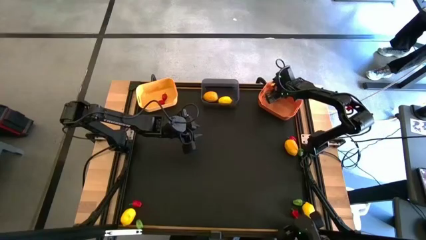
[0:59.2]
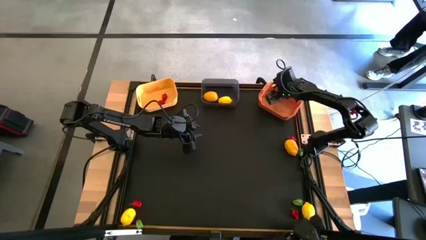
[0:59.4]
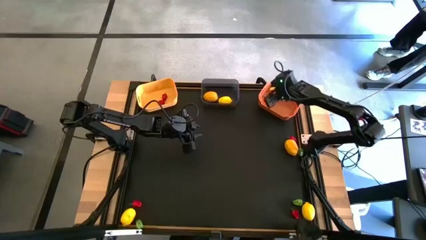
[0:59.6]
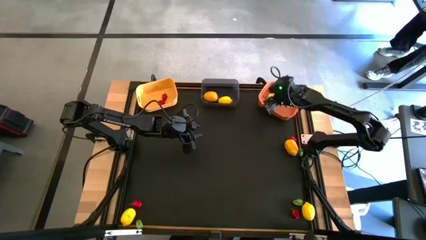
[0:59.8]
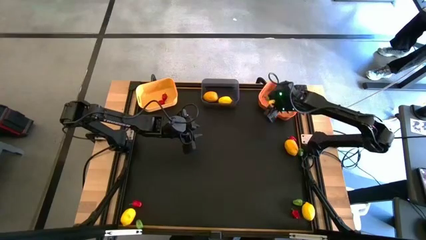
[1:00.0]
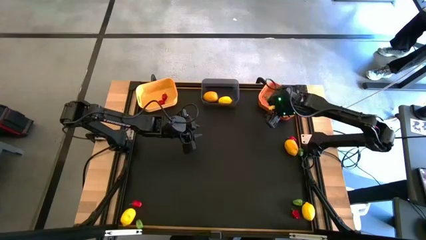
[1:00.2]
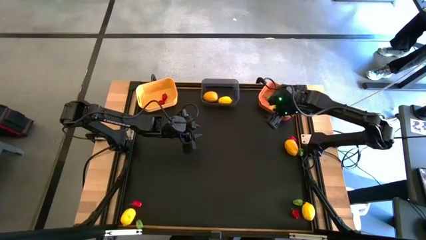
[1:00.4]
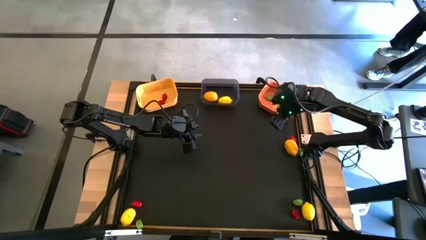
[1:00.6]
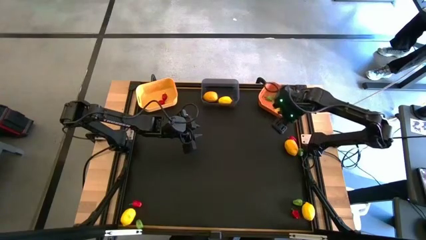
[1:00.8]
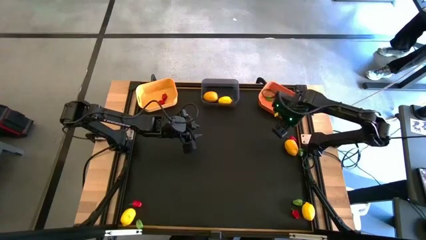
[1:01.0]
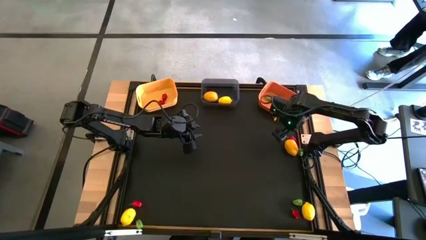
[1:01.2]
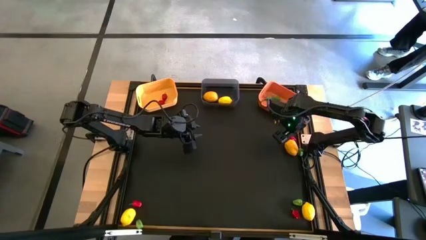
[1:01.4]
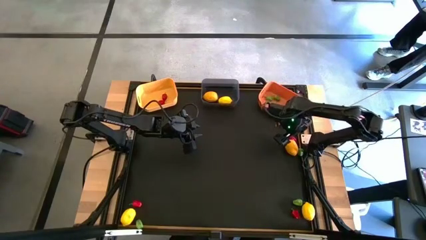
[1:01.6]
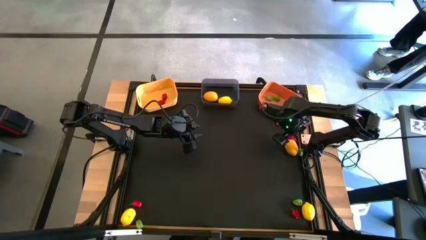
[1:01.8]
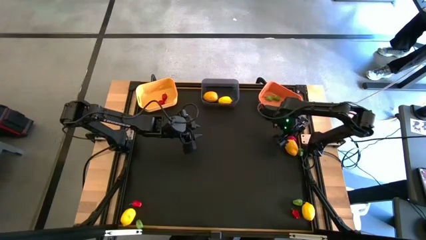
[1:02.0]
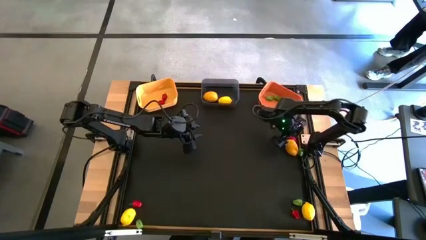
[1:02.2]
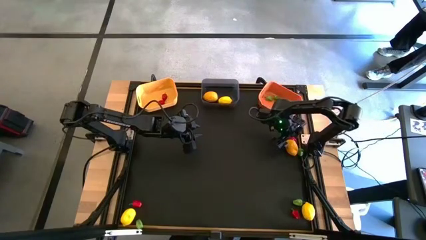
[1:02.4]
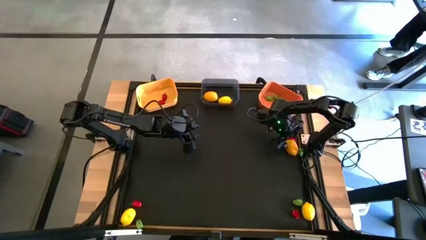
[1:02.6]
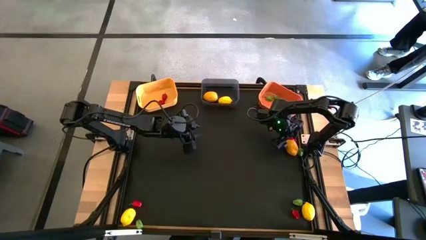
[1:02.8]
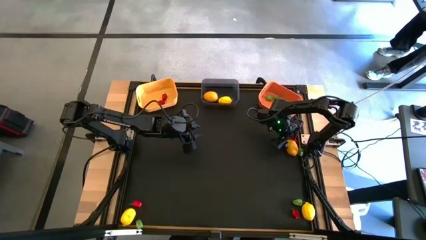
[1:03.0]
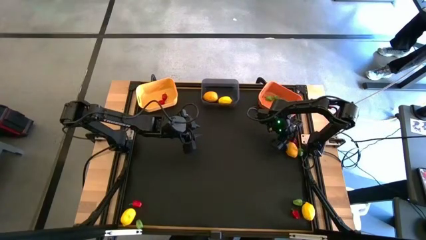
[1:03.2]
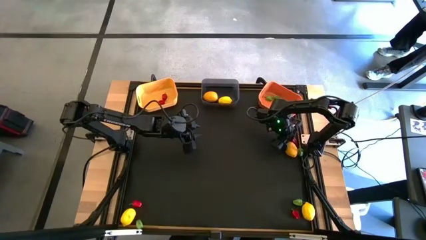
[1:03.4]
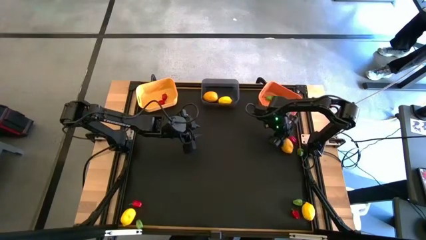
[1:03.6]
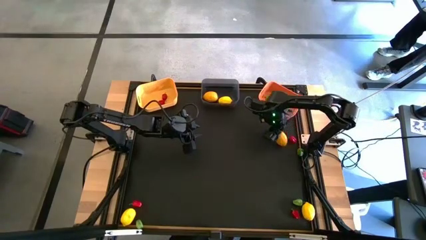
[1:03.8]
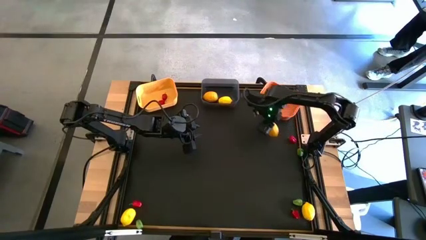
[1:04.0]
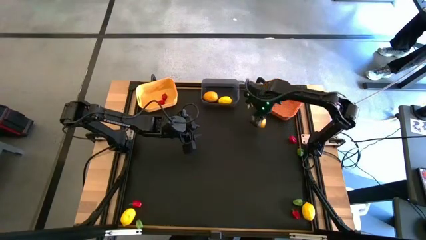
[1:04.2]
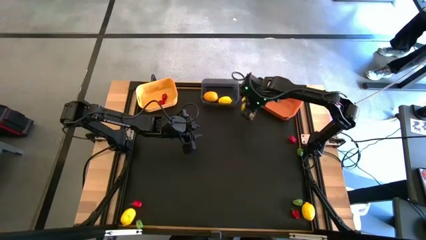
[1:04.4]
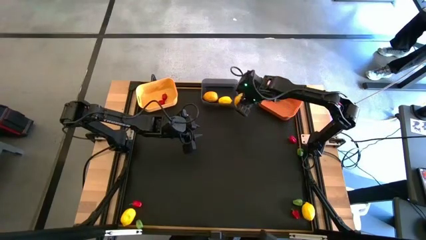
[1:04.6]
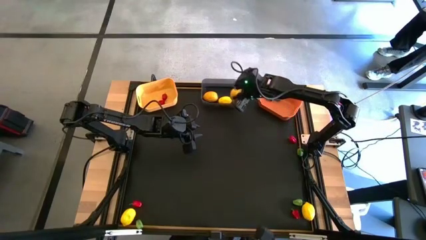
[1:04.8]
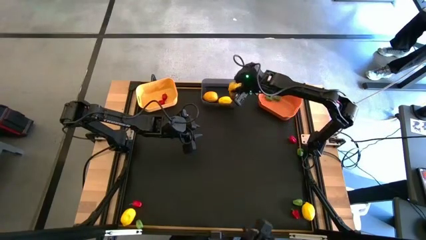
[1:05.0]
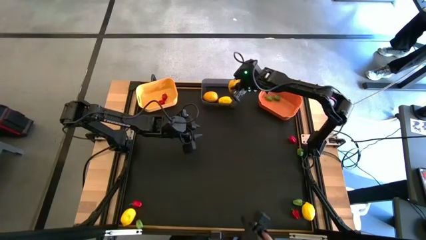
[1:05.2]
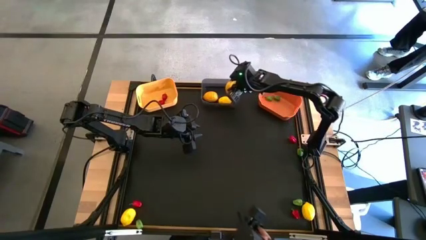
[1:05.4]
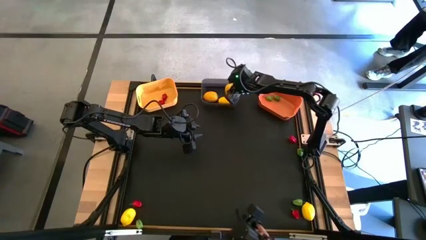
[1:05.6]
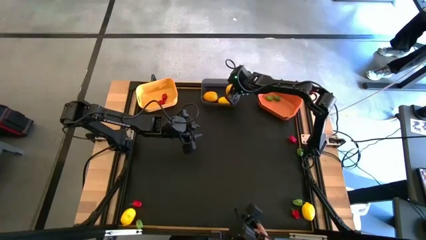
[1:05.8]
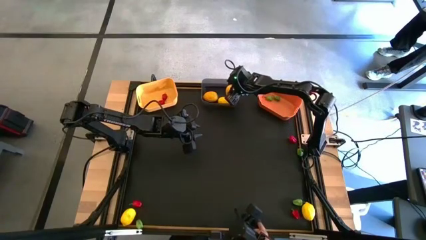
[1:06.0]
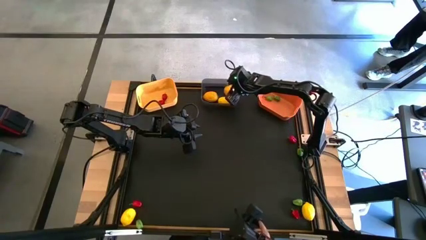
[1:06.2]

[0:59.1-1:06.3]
Task: Sort produce into baskets
Put the yellow lemon into the black bin

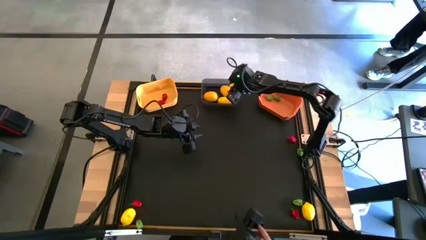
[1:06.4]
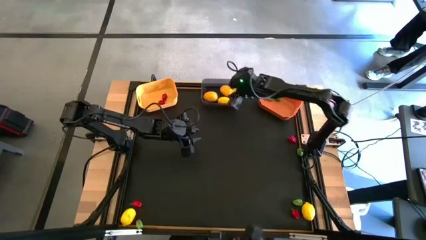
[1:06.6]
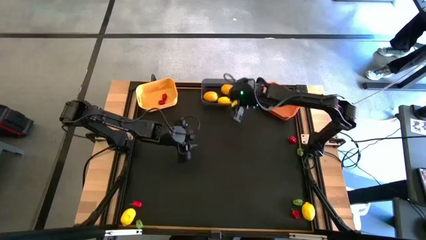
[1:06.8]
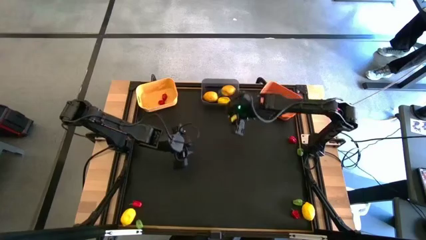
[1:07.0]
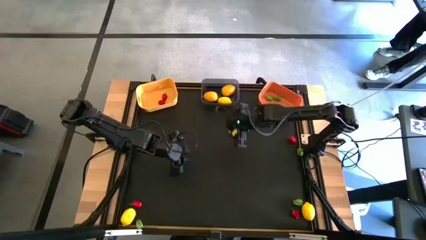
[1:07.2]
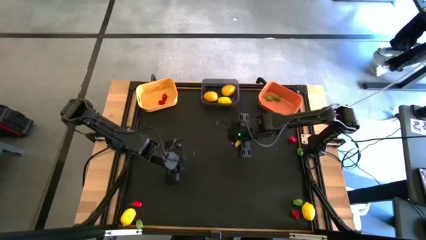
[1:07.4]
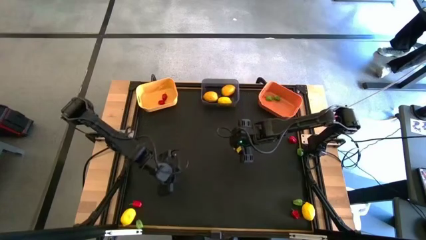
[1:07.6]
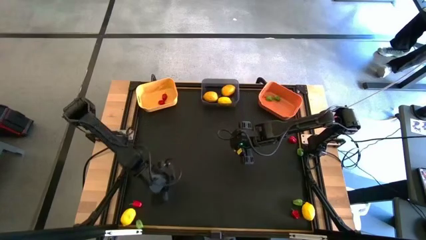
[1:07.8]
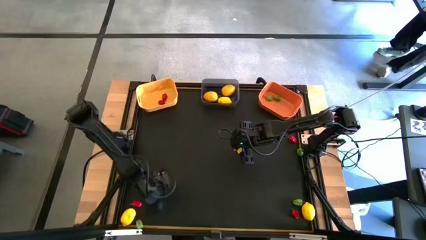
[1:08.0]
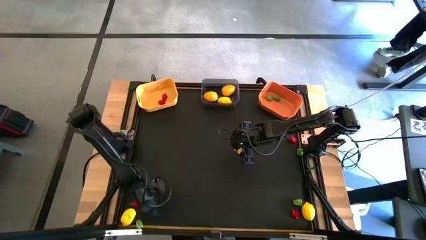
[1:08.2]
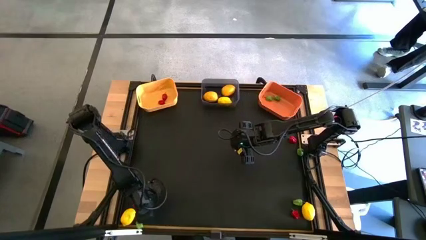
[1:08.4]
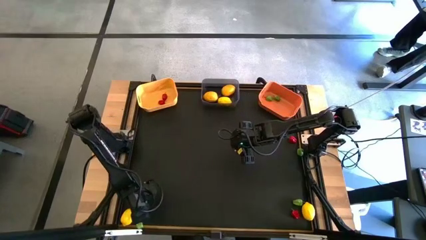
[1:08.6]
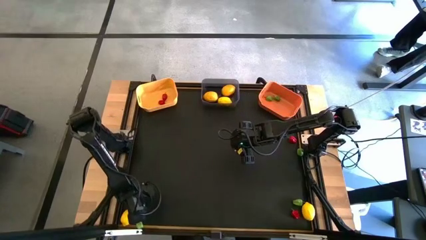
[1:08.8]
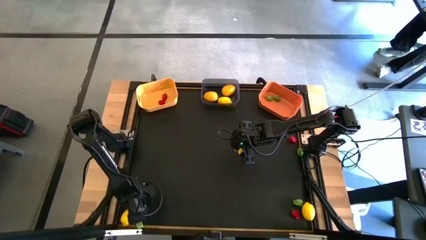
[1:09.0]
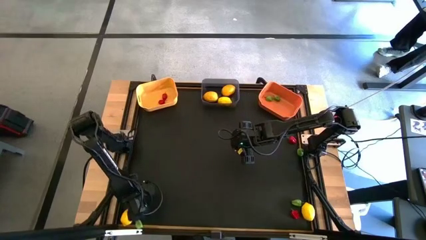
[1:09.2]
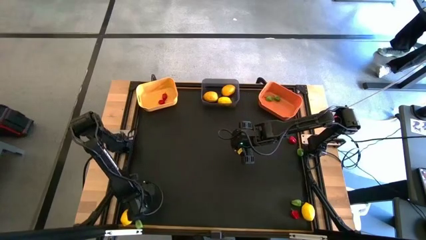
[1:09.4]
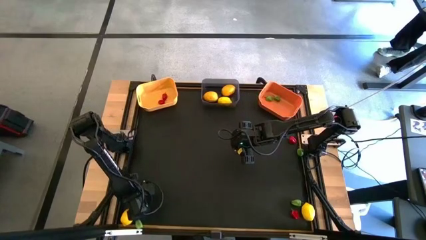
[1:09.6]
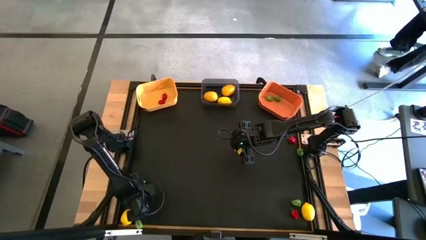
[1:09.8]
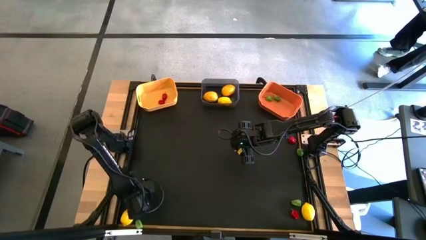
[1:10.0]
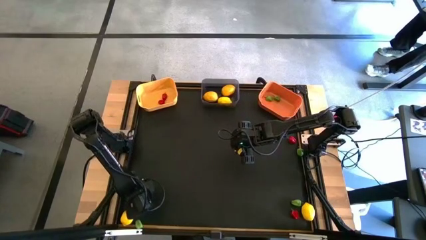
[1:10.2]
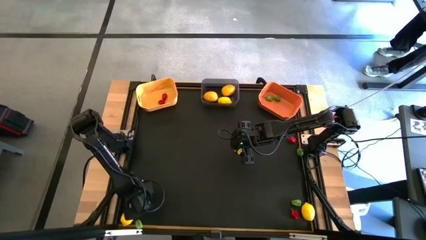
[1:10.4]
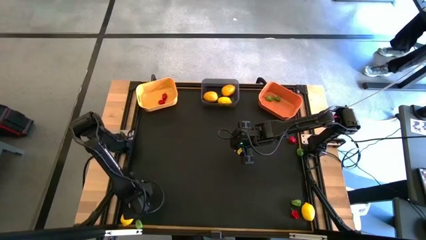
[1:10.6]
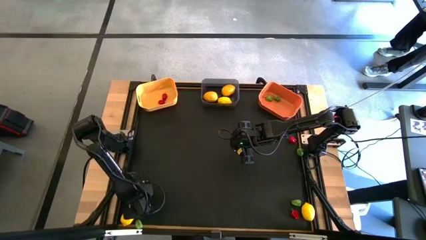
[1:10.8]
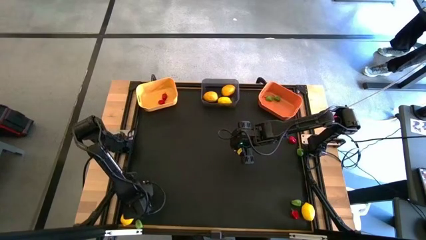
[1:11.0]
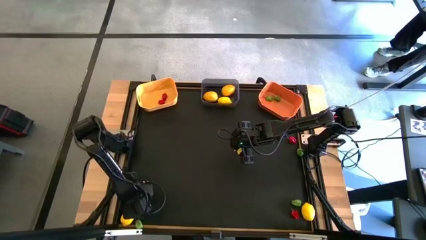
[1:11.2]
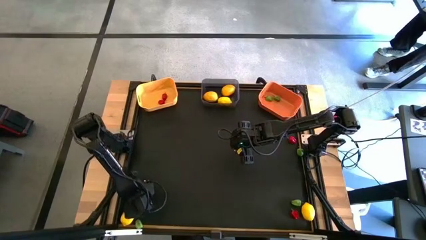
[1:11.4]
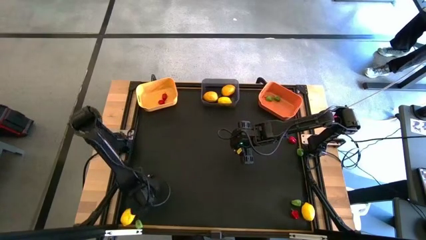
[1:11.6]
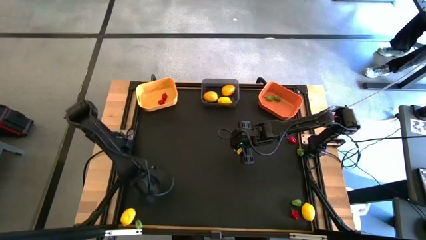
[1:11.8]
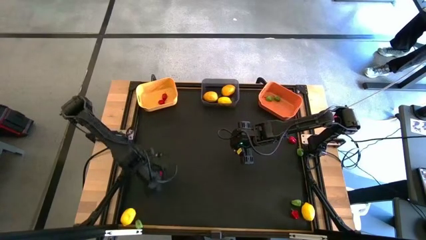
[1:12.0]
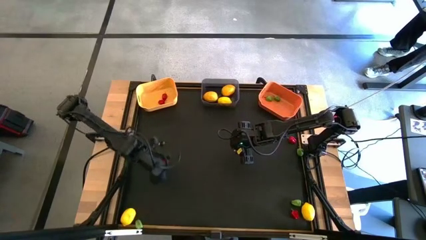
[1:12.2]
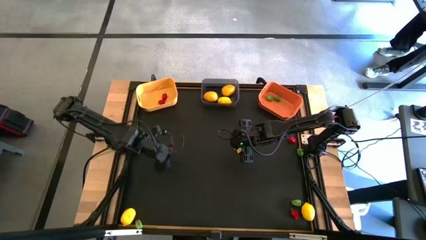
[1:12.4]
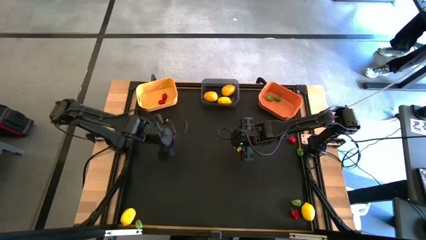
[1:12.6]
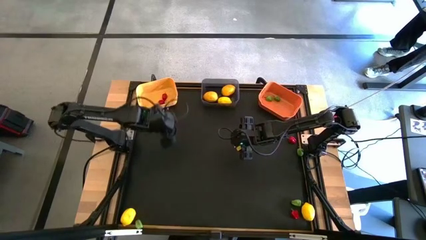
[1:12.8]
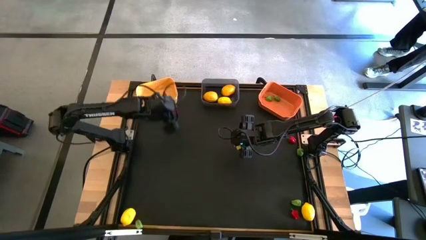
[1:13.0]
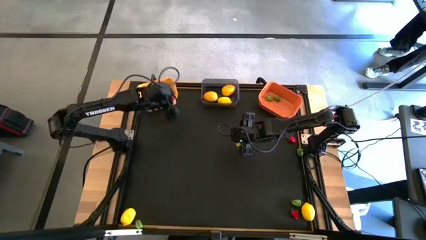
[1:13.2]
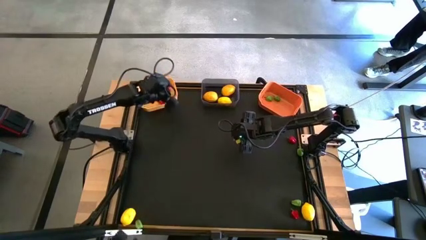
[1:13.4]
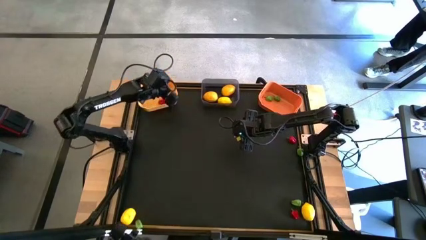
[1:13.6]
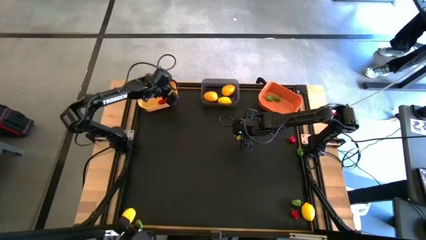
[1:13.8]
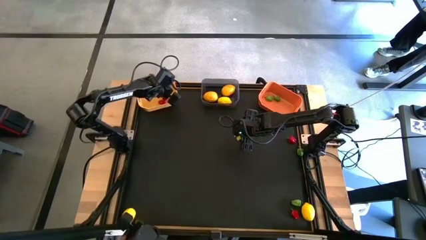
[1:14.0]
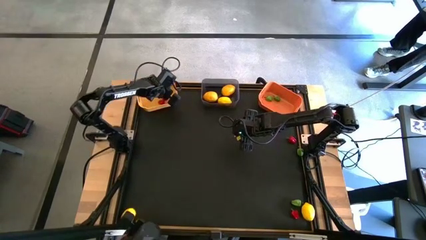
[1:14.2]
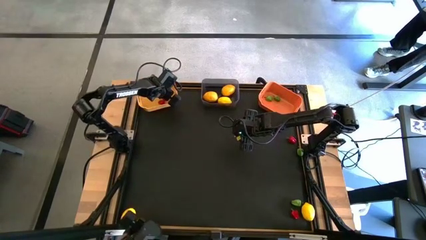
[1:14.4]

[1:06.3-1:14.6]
Put the red chili pepper into the yellow bin

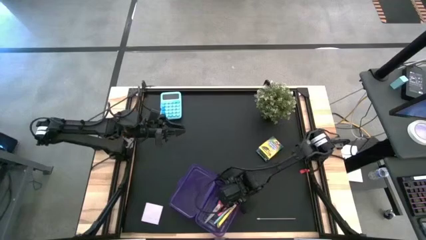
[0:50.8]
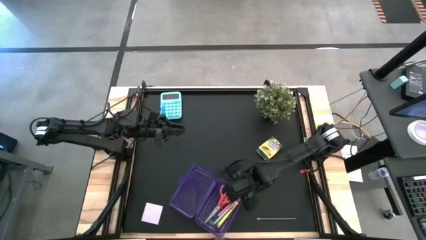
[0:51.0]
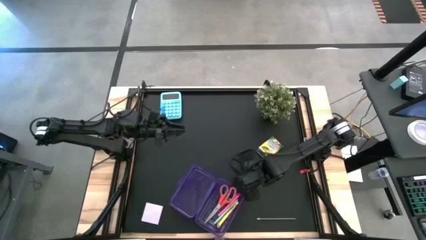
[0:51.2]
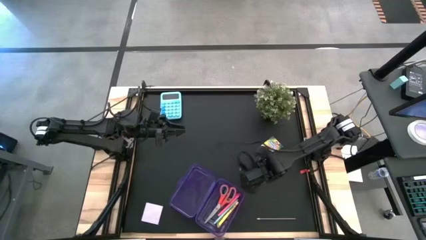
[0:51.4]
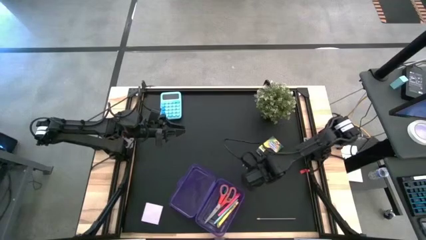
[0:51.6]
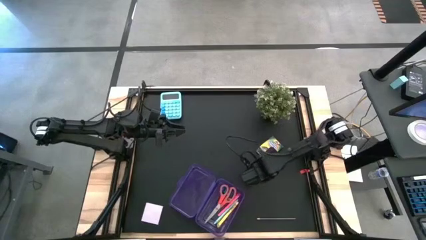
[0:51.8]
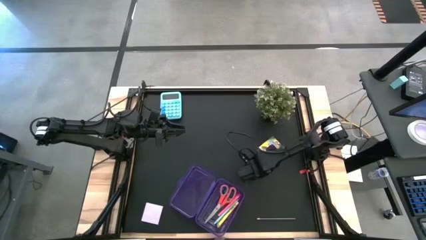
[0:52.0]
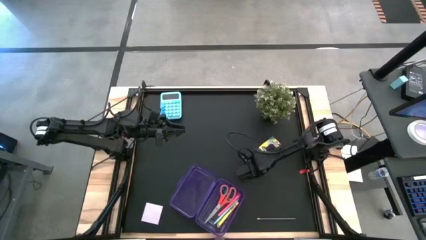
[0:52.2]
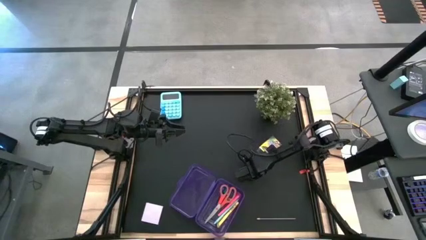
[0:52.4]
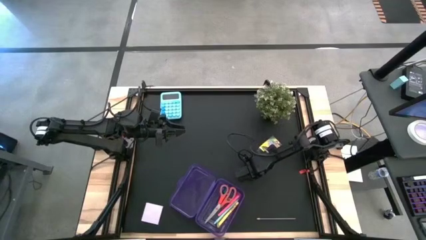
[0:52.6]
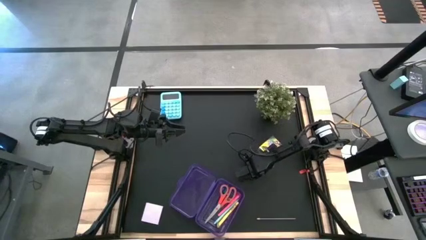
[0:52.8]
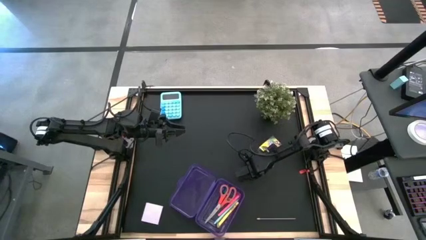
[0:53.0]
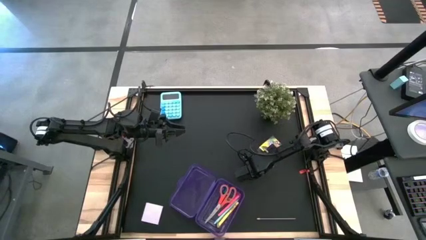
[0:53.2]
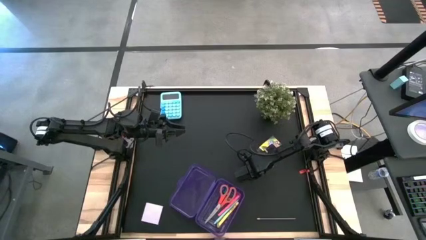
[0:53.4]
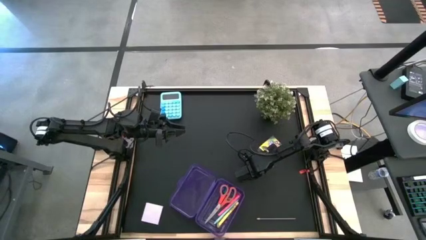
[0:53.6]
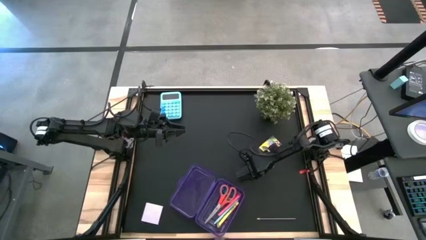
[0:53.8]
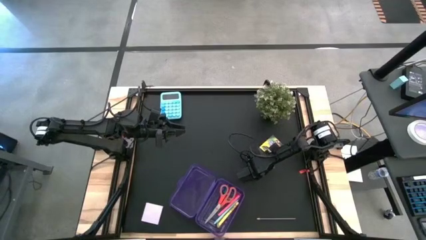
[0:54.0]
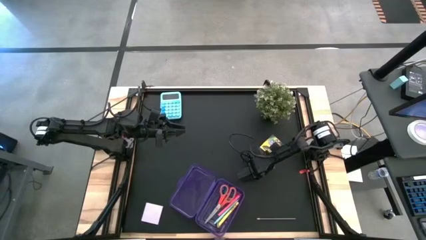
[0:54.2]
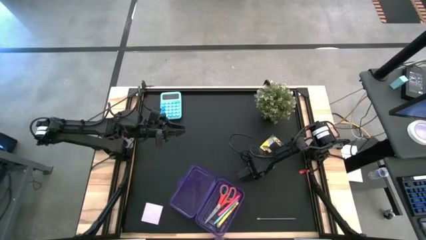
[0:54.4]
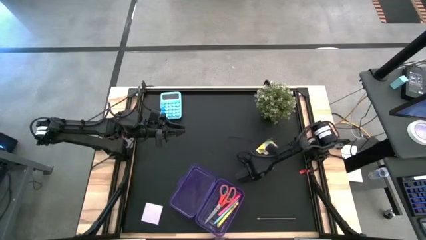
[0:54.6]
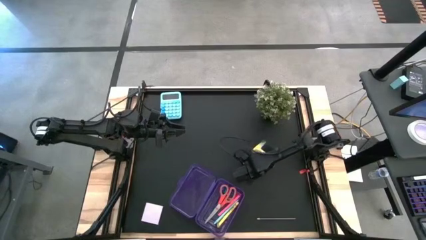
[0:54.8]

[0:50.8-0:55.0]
Task: Pack school essentials
Put the yellow crayon box into the purple supply box
